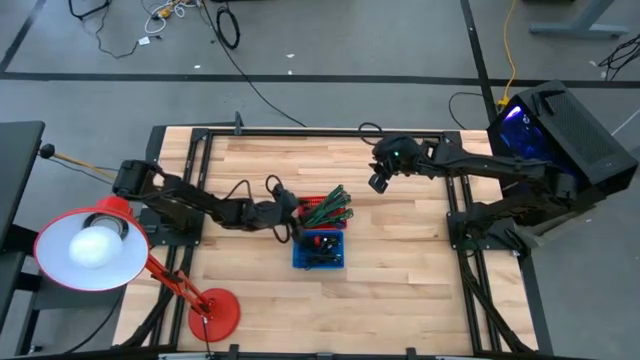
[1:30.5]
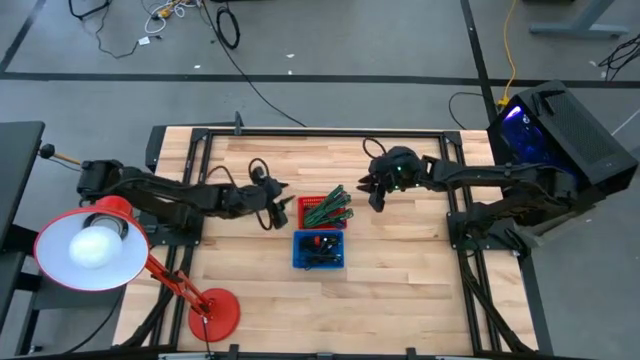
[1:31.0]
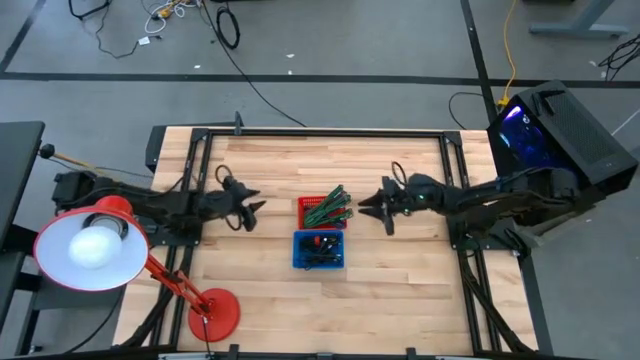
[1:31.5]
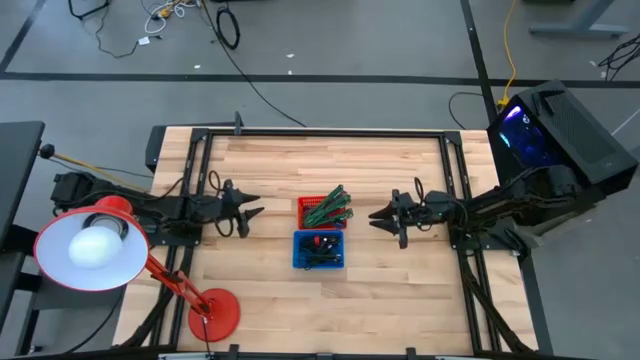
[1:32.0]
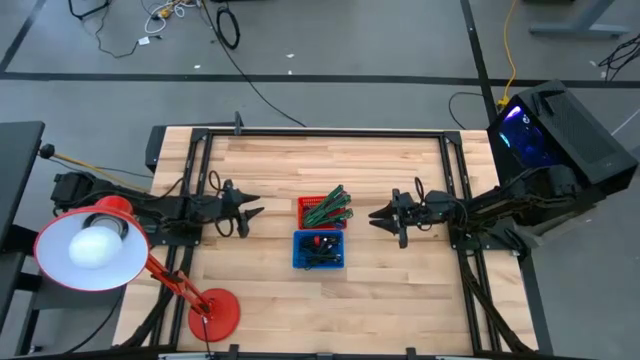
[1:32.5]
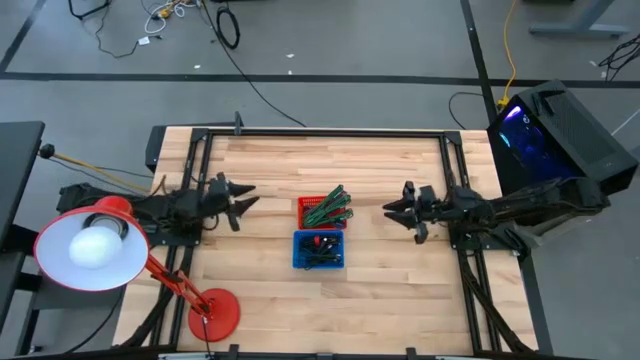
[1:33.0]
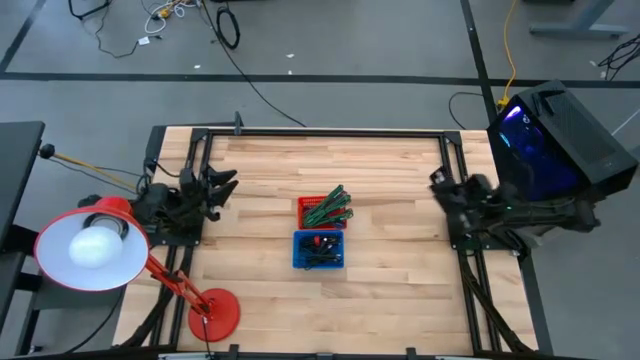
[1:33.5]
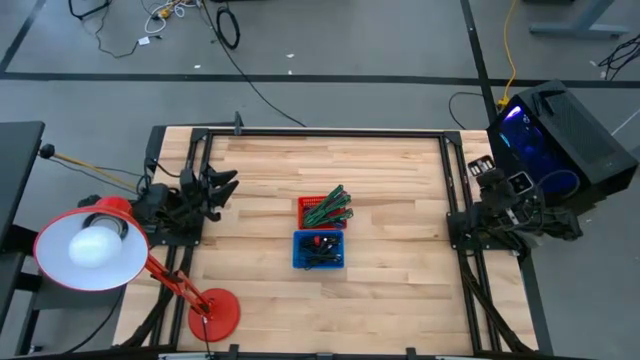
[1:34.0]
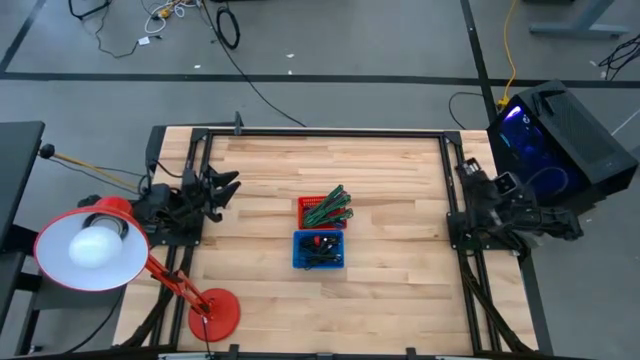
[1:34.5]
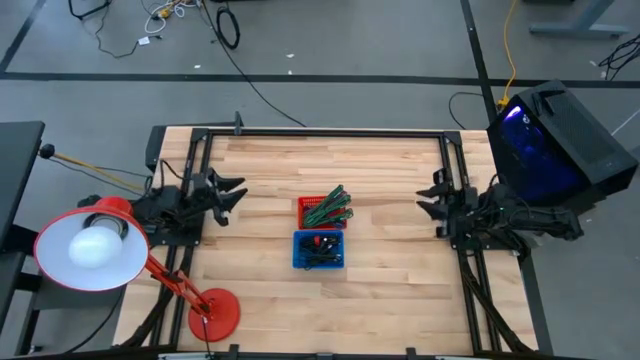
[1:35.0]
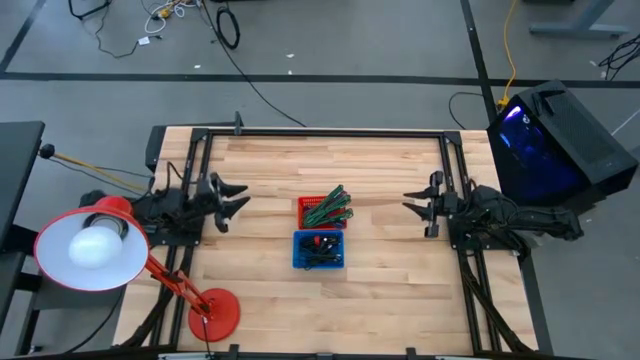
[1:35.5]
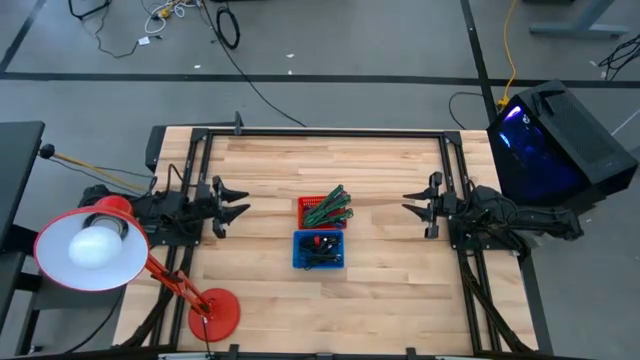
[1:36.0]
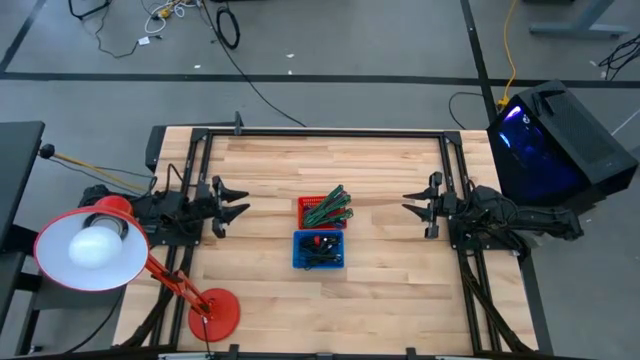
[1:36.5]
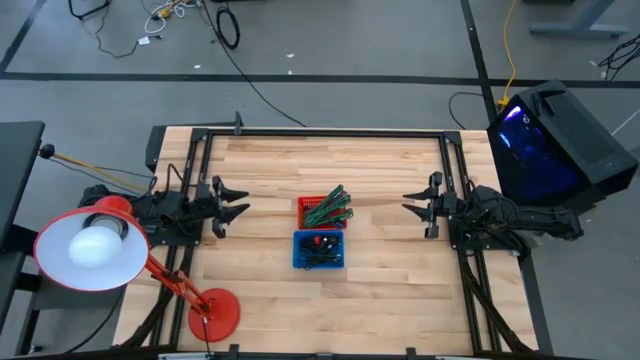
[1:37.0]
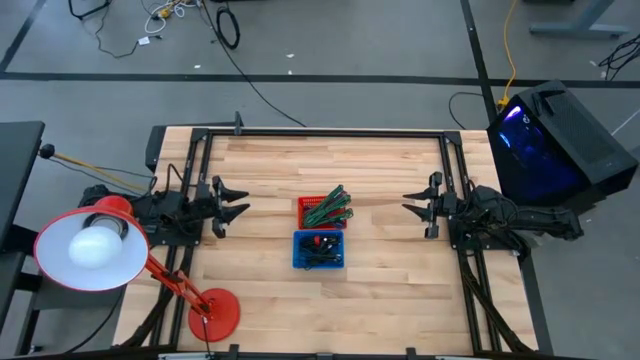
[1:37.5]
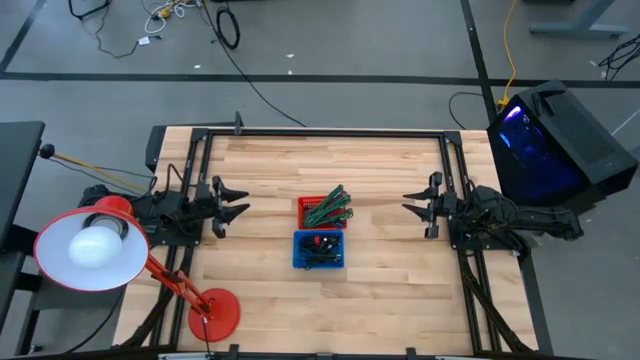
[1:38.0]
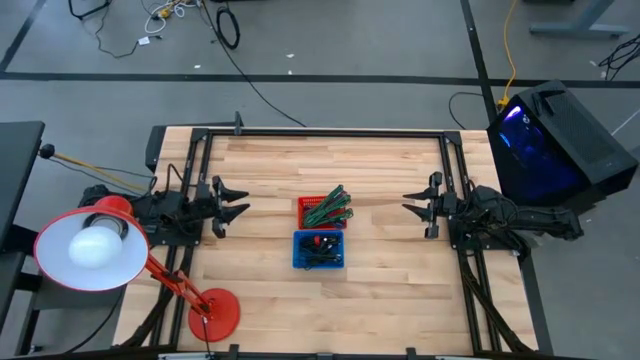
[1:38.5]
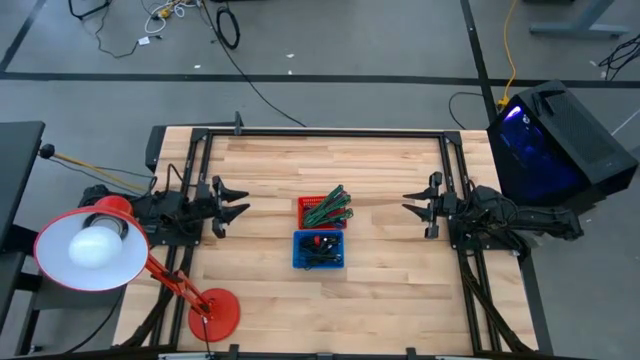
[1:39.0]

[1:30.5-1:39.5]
Task: Pick & Place USB Port
Return to Home Position

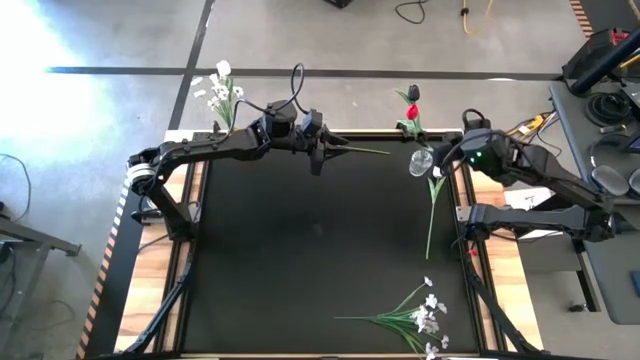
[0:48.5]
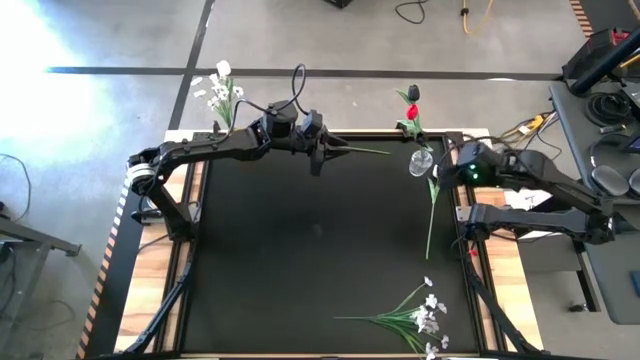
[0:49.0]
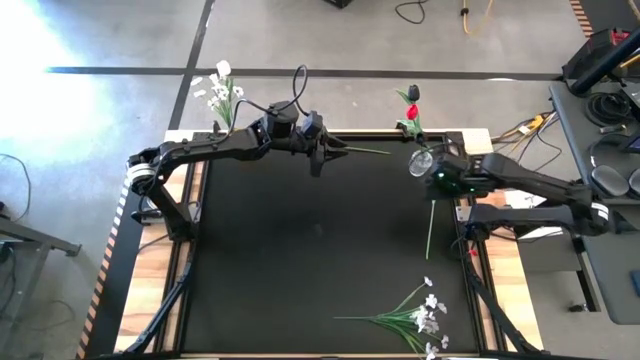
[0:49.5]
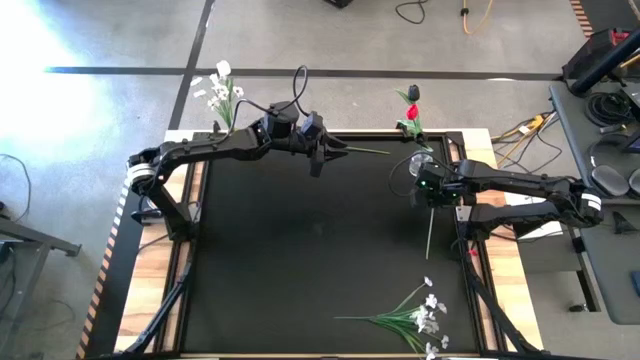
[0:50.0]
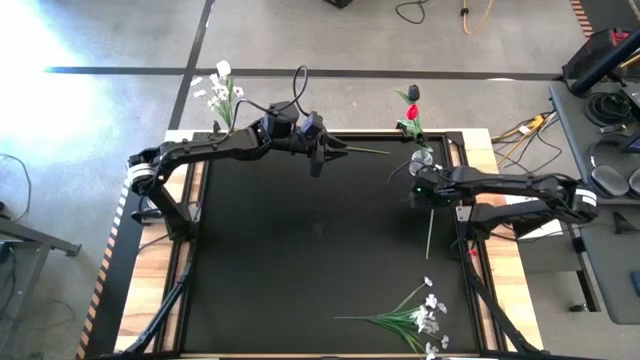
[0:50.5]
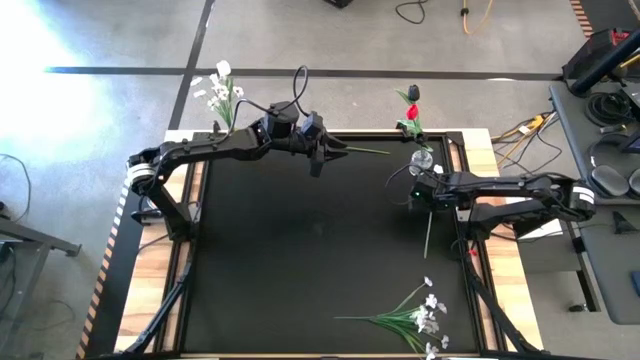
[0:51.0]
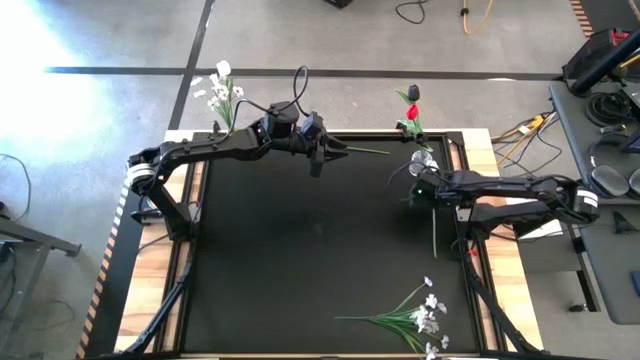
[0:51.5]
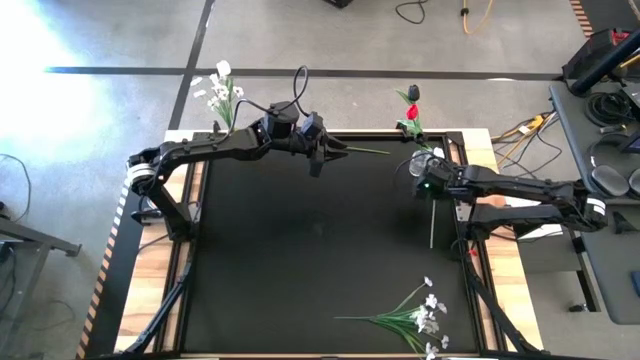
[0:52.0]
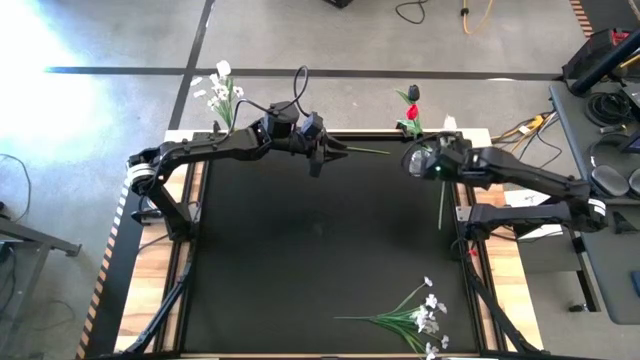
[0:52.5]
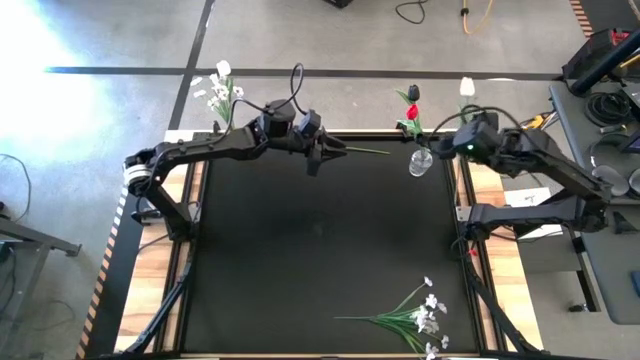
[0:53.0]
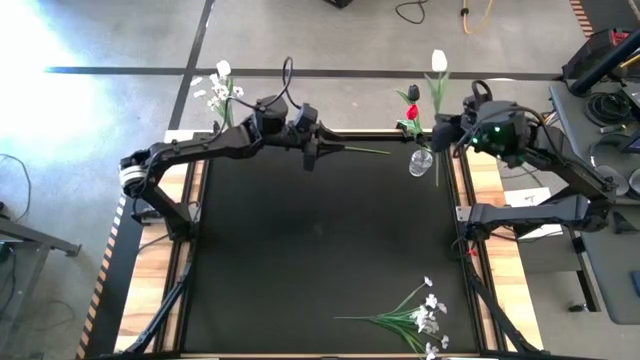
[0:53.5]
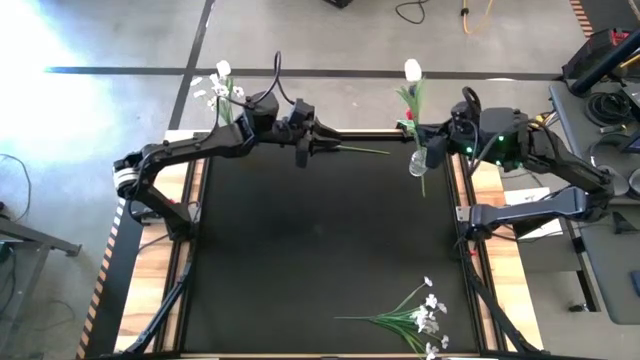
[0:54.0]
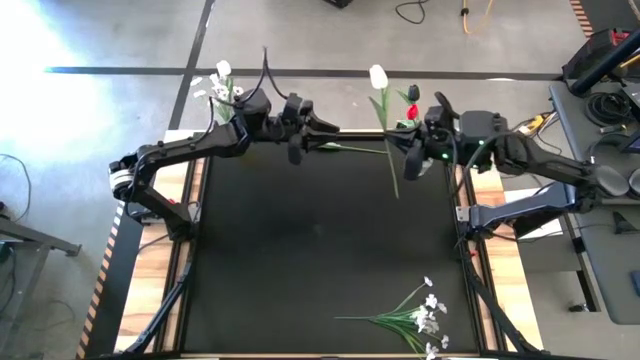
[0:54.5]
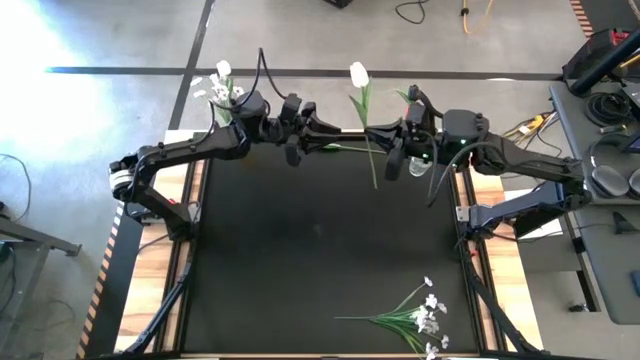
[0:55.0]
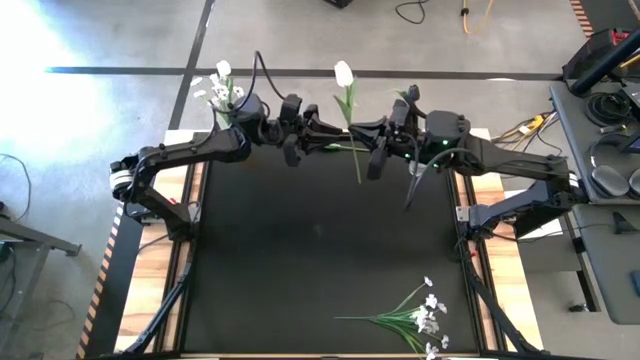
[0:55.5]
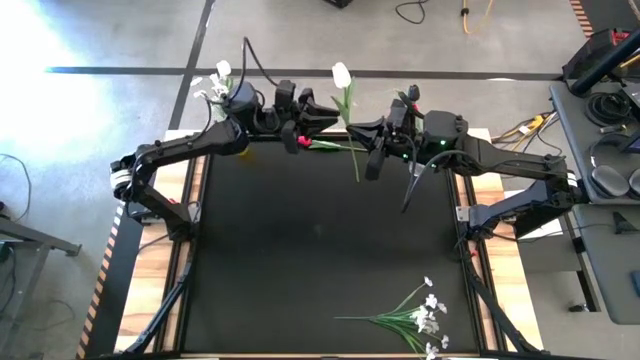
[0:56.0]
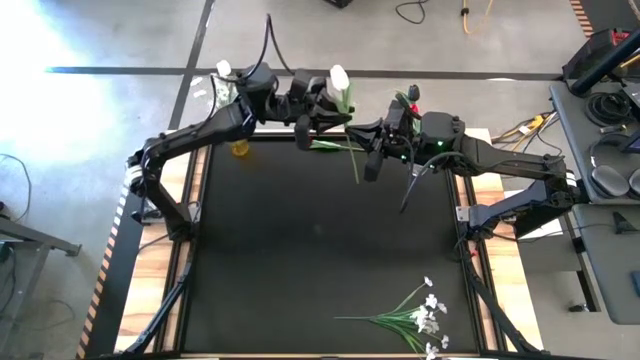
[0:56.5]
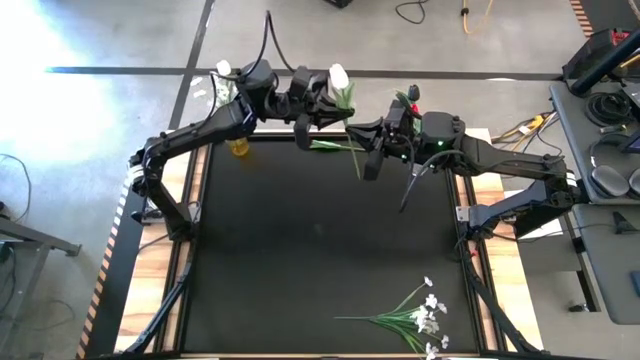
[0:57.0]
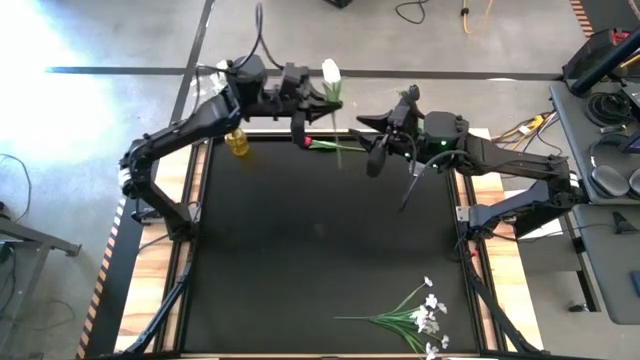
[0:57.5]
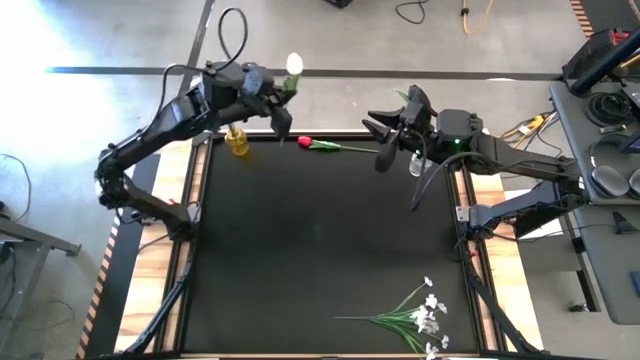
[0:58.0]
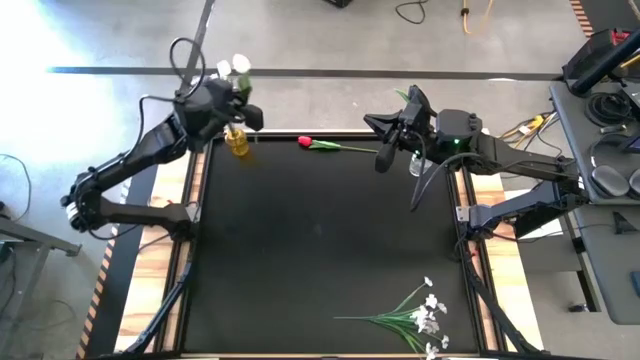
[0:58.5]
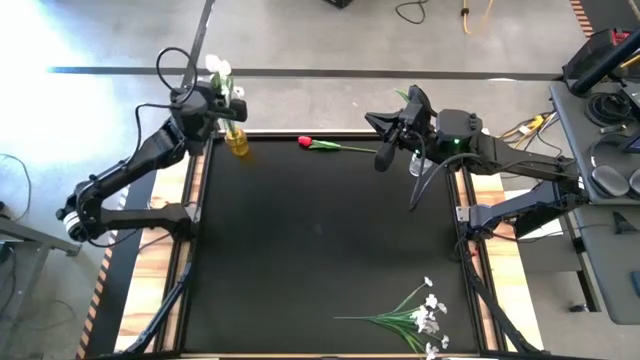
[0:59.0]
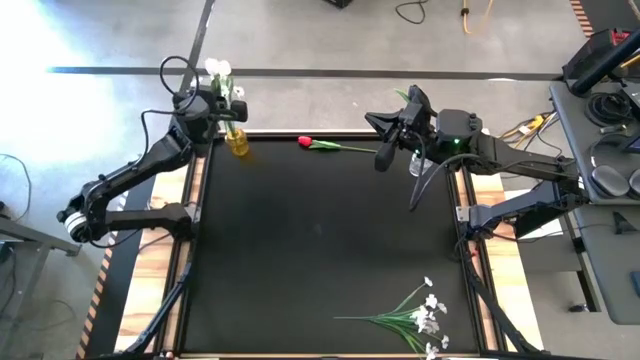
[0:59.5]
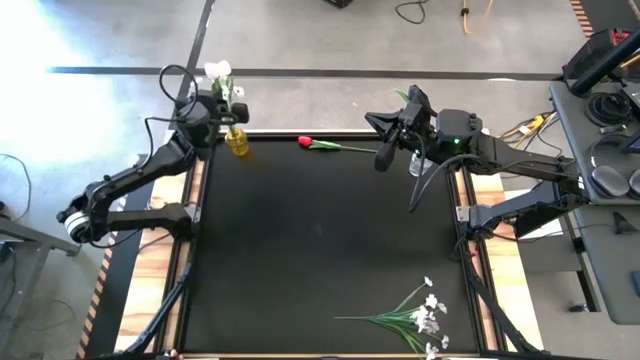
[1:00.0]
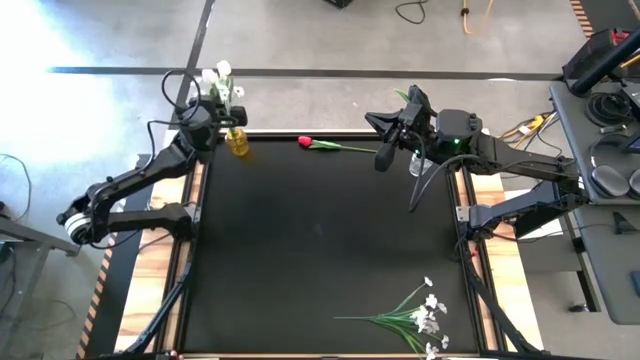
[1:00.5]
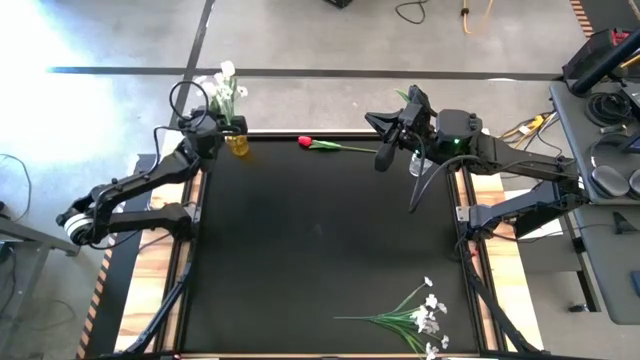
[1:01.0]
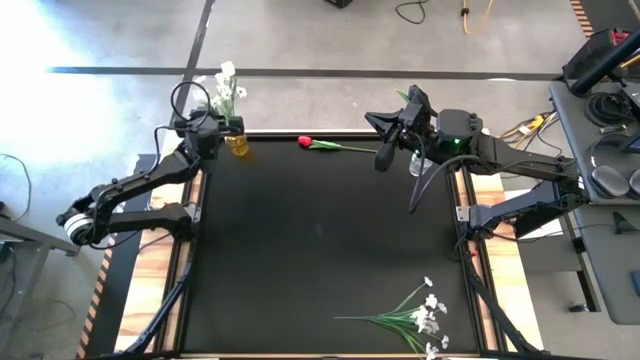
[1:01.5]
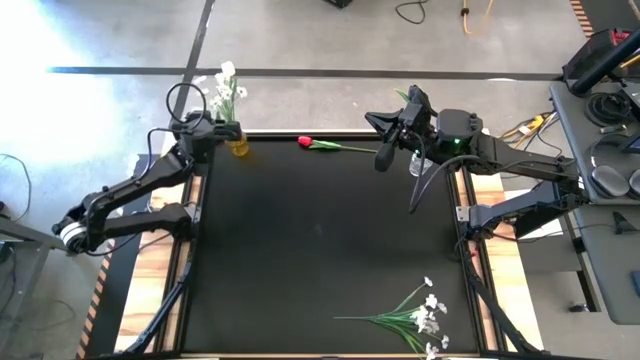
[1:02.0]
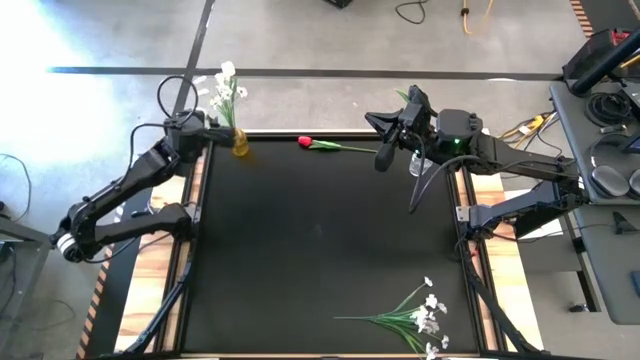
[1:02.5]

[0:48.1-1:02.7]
Task: Sort flowers into vase by color
Put the white tulip into the yellow vase
